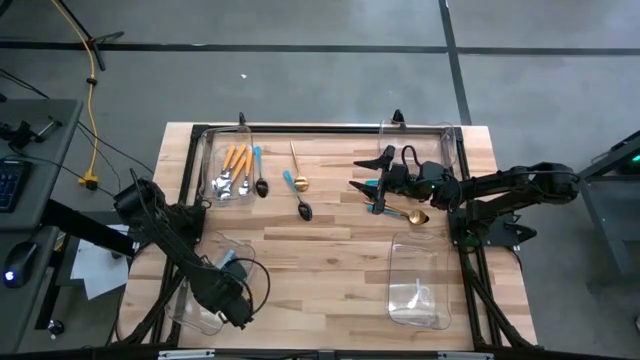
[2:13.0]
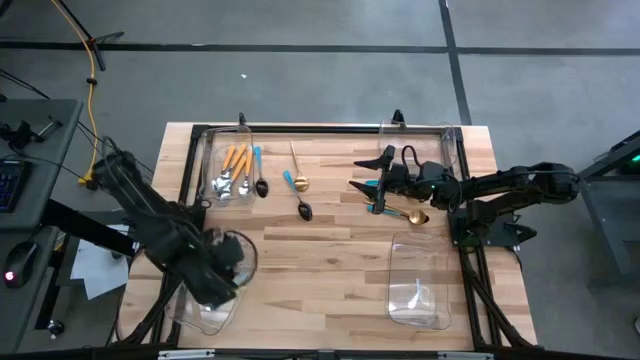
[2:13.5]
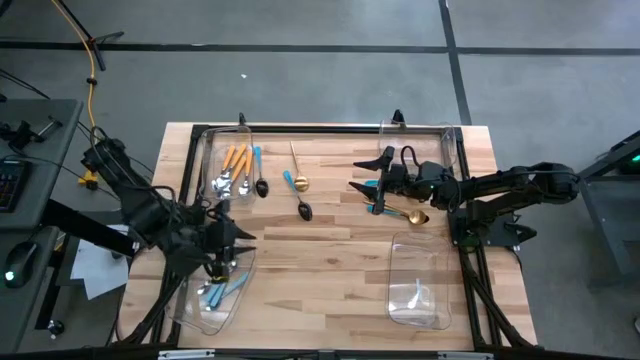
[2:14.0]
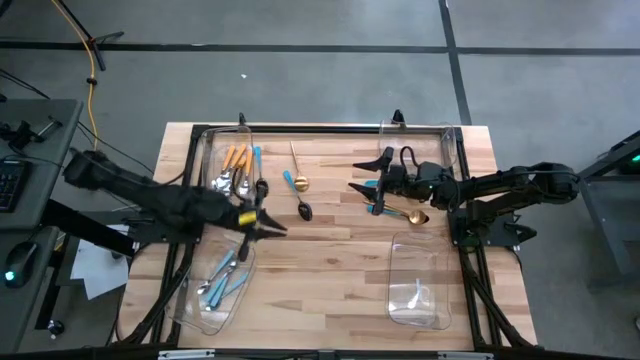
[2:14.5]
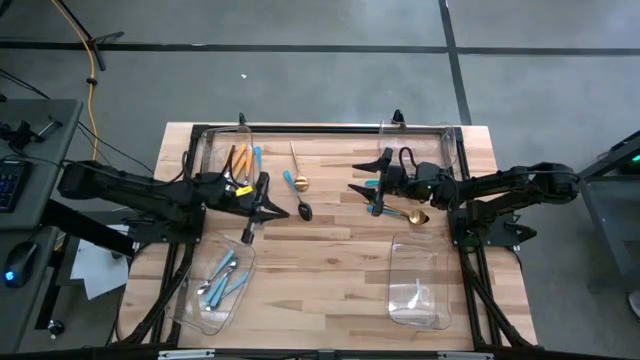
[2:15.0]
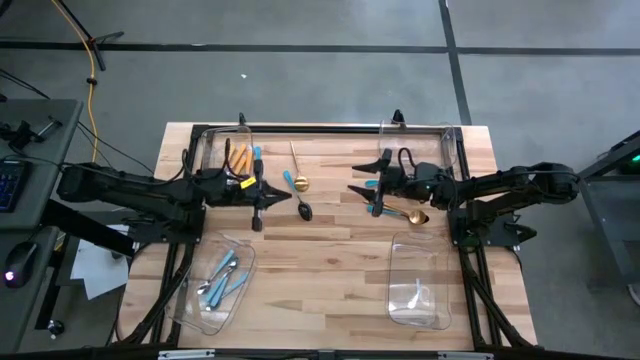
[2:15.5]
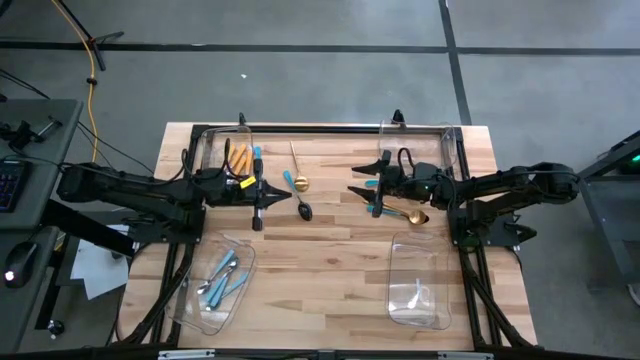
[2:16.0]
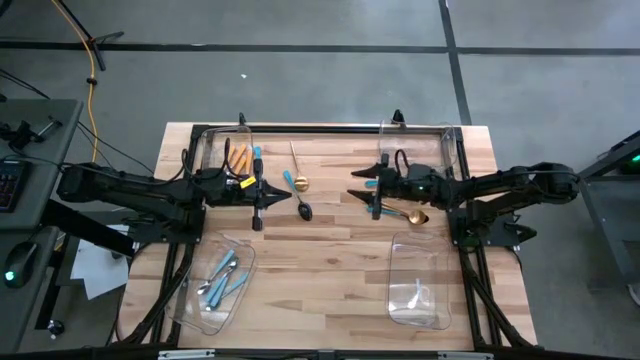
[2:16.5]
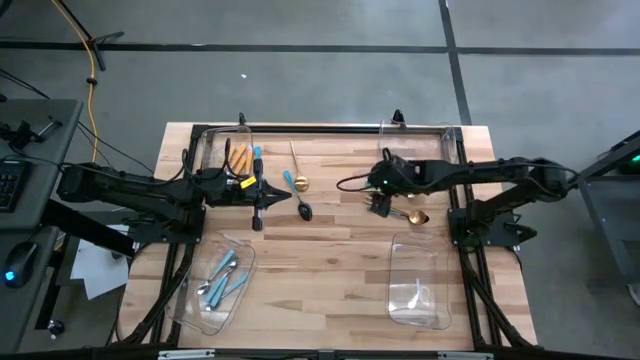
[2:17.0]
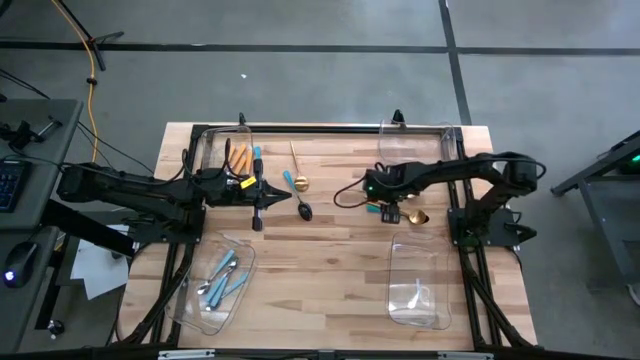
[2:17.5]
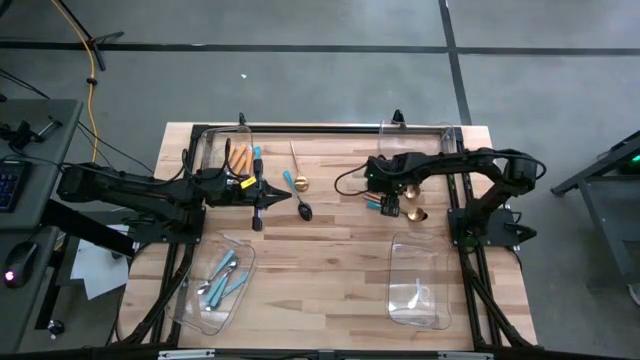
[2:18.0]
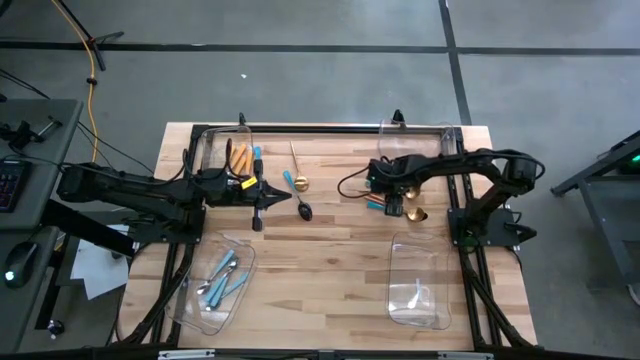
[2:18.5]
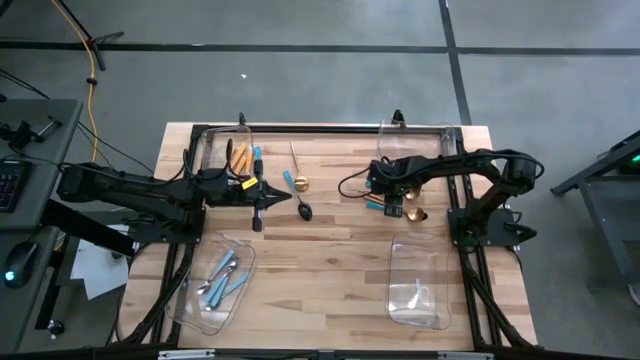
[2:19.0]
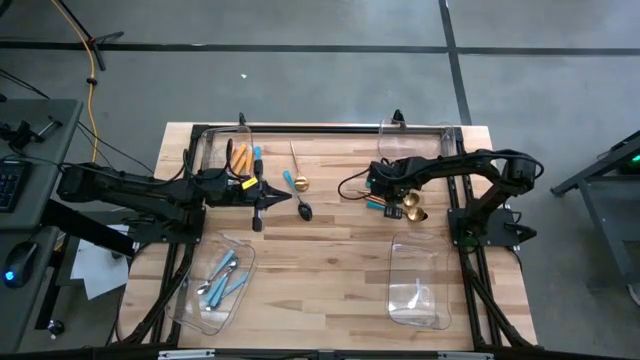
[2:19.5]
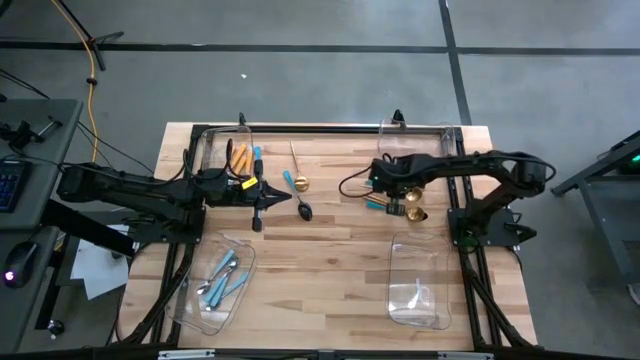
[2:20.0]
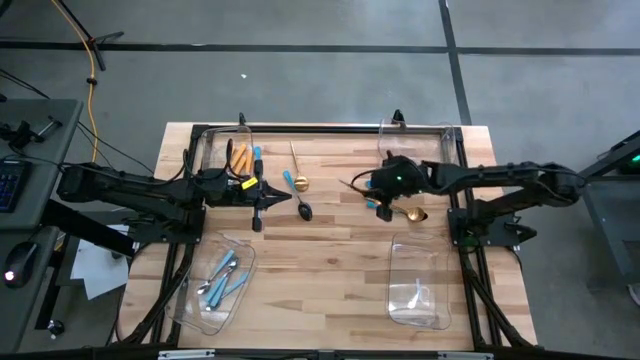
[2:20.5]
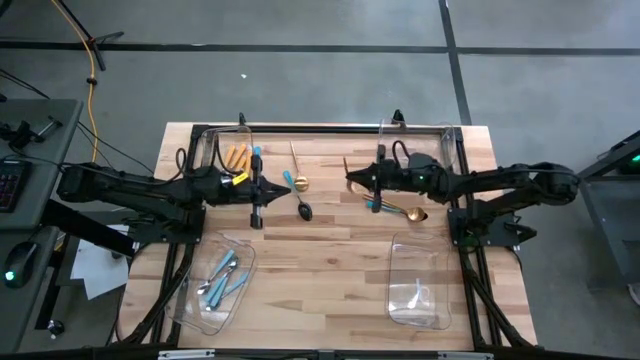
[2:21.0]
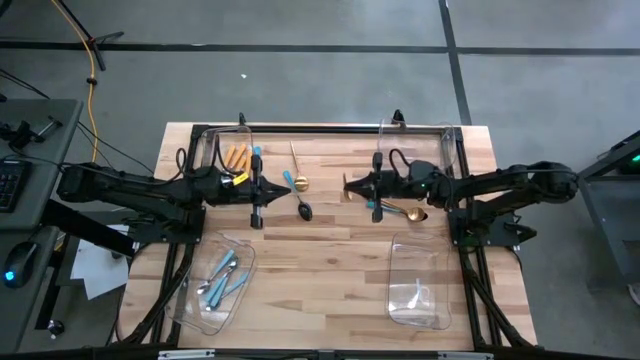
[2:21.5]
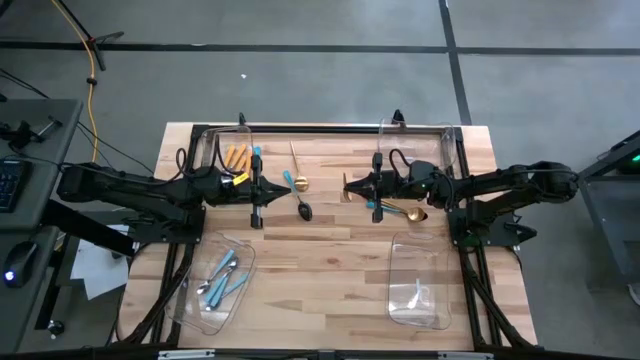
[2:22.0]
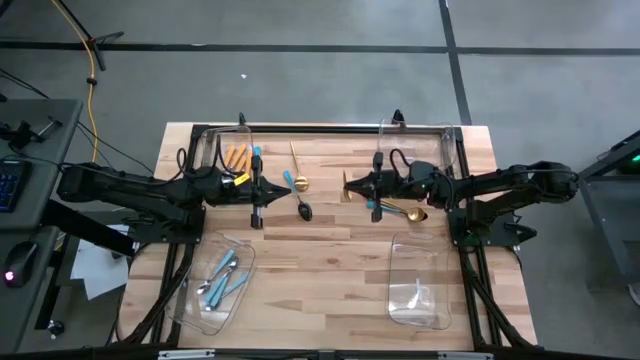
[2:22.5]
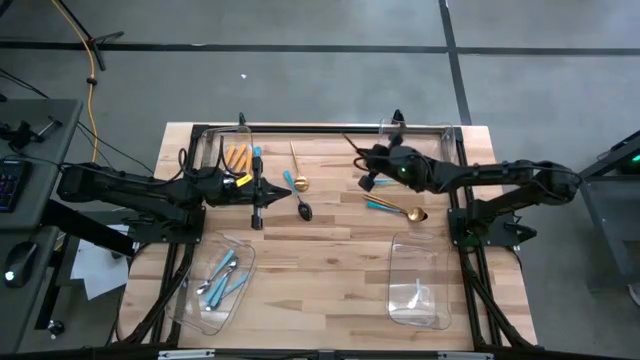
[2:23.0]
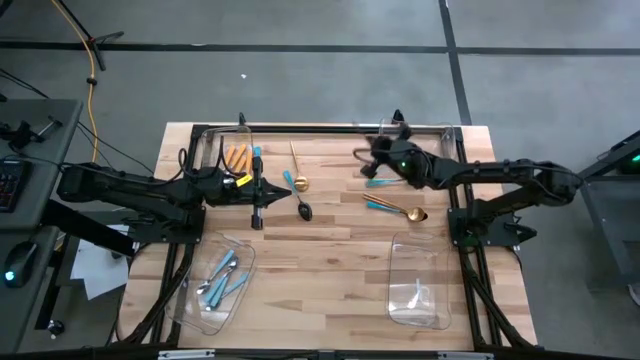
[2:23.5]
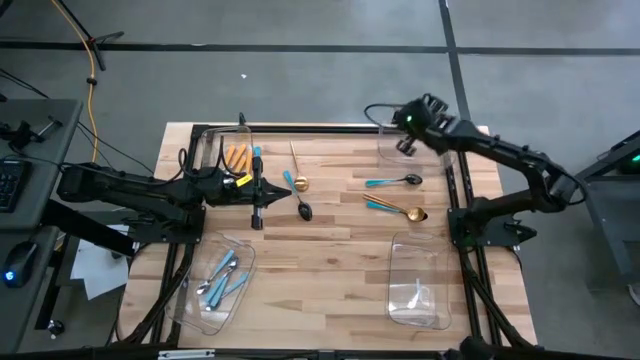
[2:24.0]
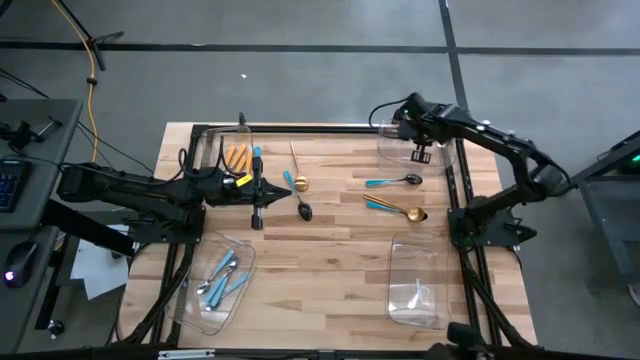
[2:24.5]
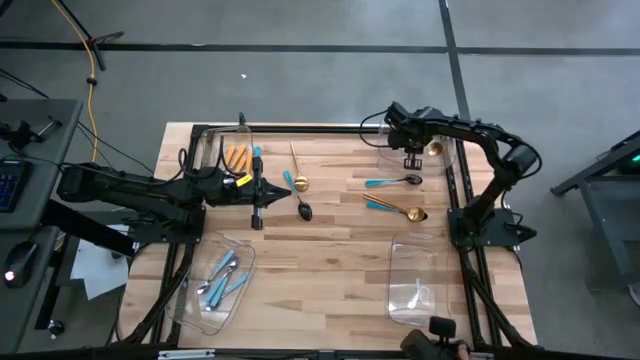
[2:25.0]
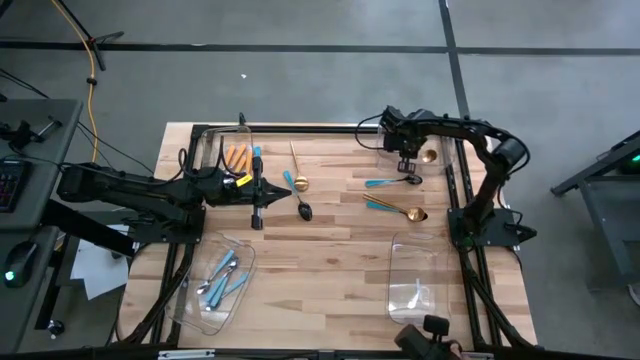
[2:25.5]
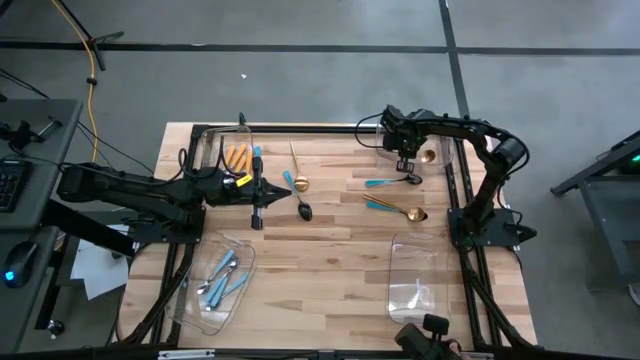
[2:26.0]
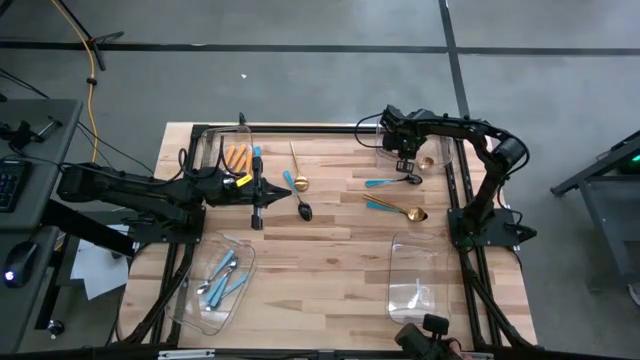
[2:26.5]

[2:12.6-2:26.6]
Task: Sort silverware by color (type)
Put the gold spoon into the top right transparent bin

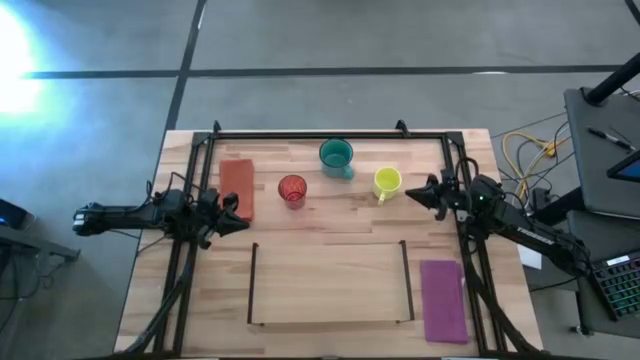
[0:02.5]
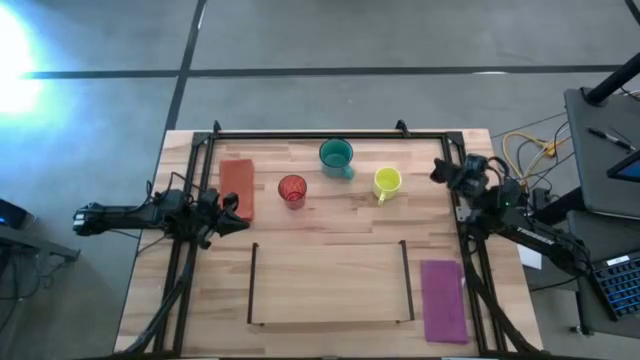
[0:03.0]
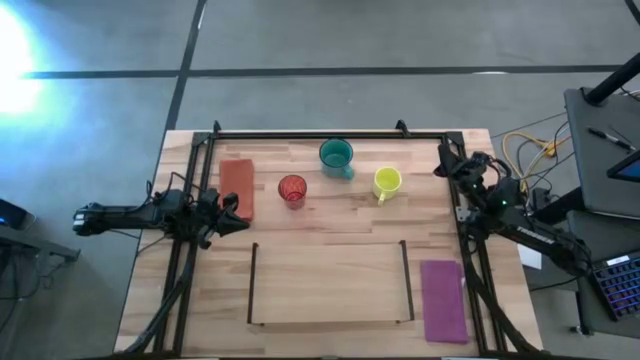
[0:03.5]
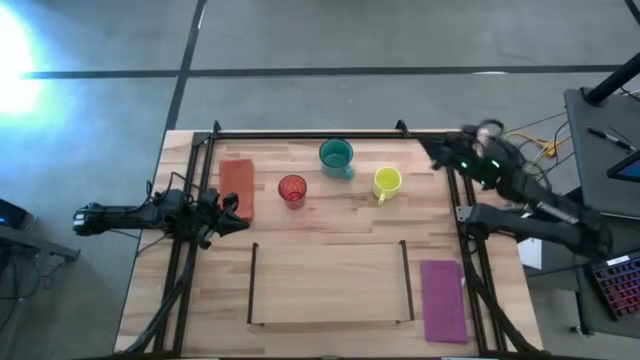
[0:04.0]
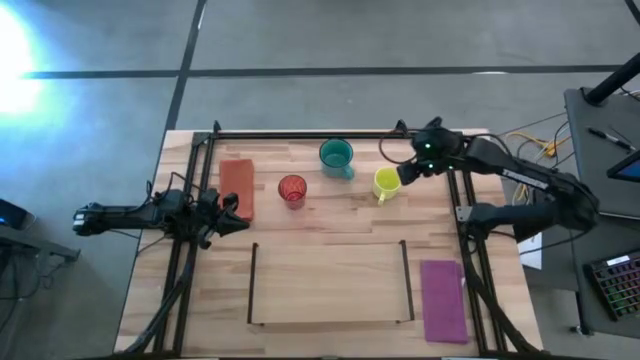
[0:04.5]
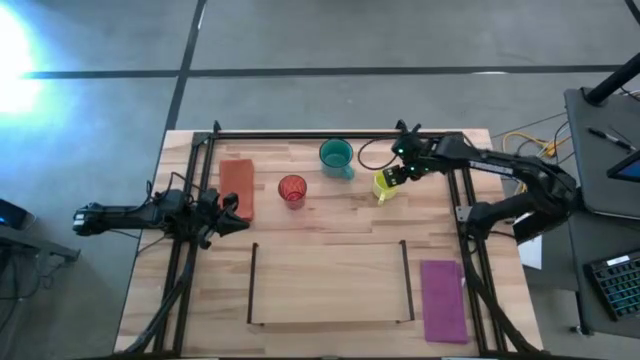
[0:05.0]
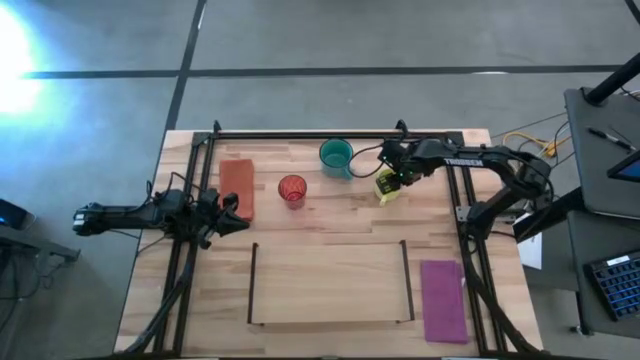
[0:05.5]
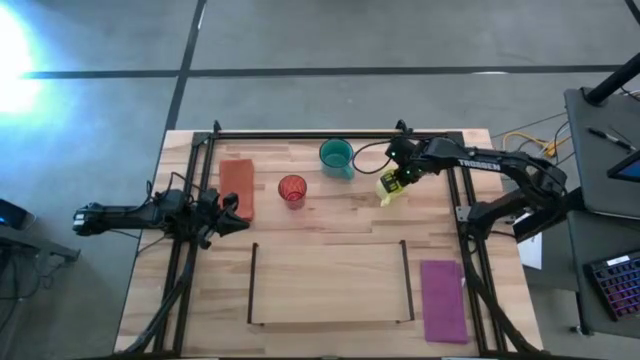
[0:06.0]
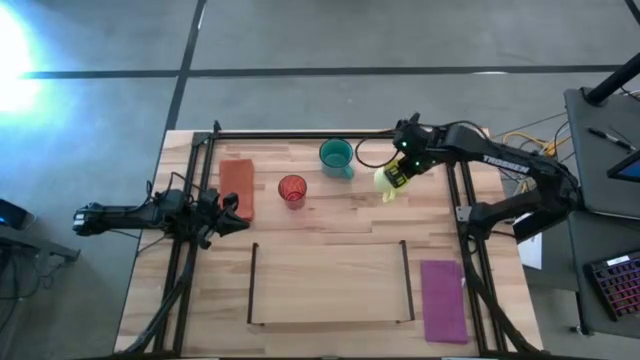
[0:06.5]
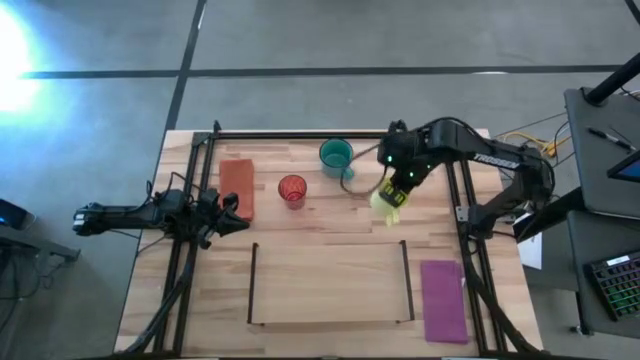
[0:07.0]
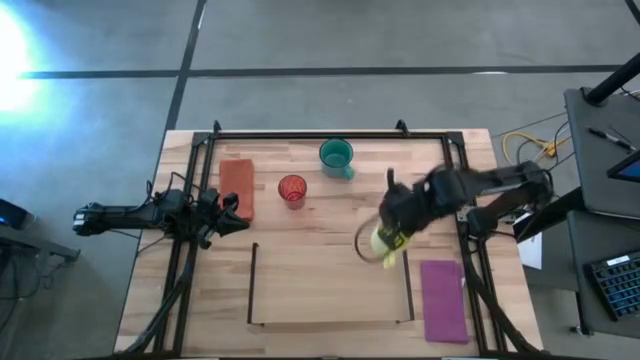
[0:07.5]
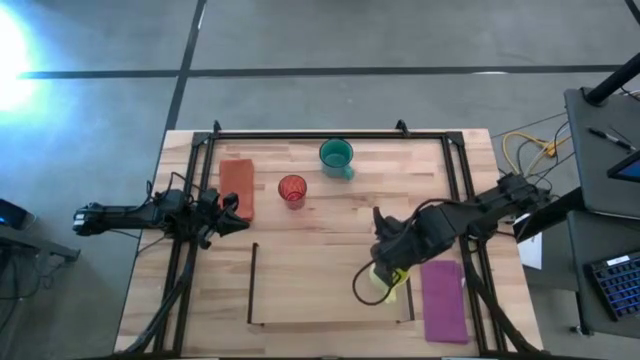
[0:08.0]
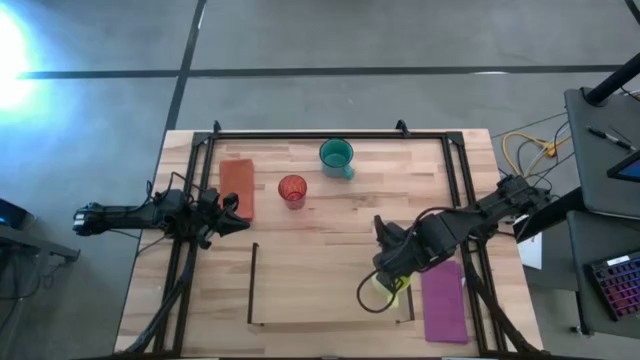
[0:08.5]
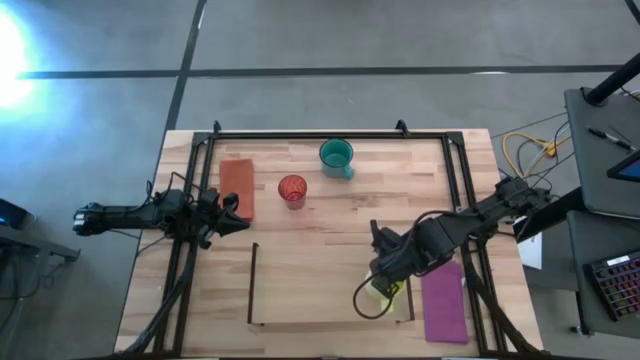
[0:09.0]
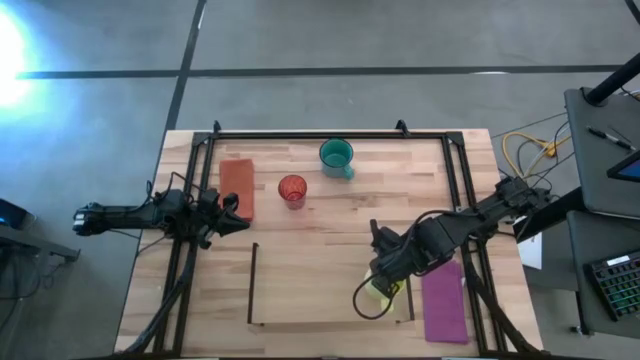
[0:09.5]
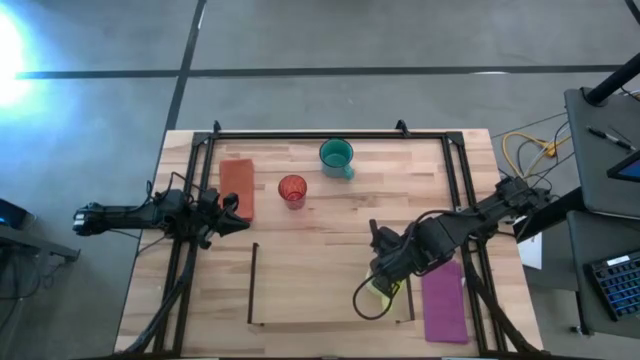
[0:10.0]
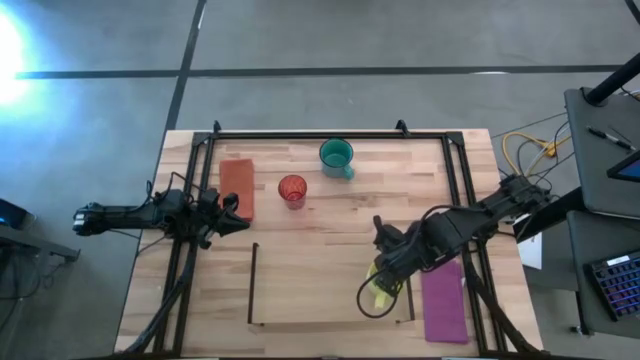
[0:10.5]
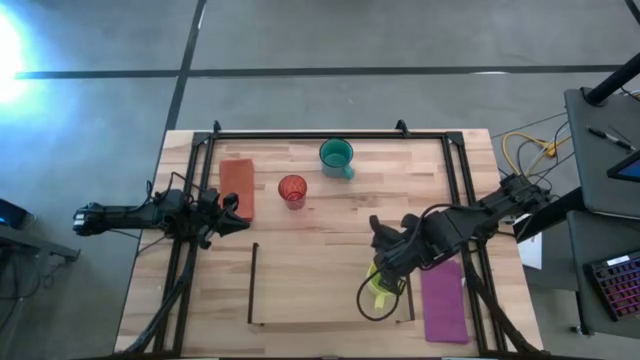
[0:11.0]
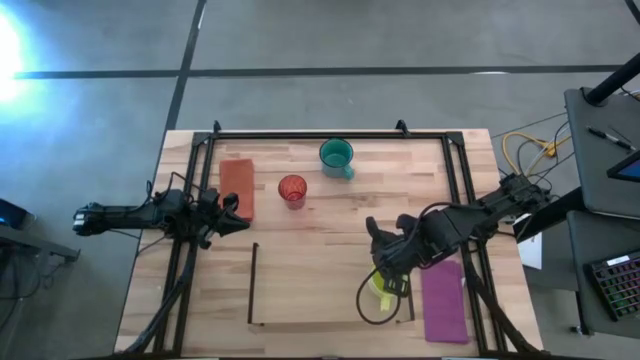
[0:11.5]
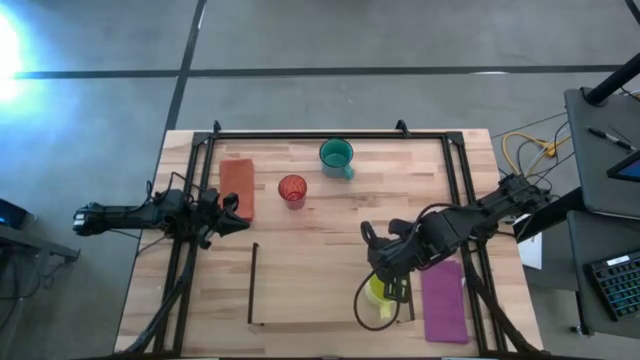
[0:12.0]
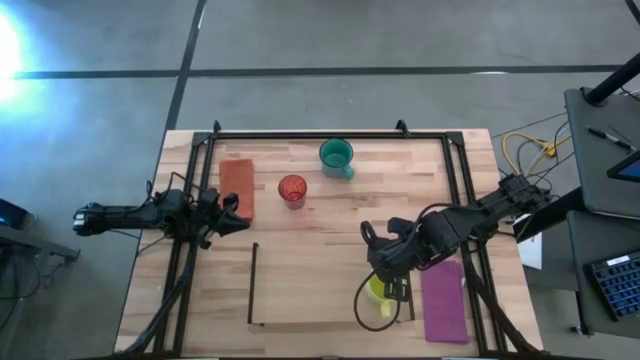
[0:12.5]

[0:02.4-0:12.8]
Task: Stack small to large cups/mugs on shelf
Put the yellow mug on the shelf
